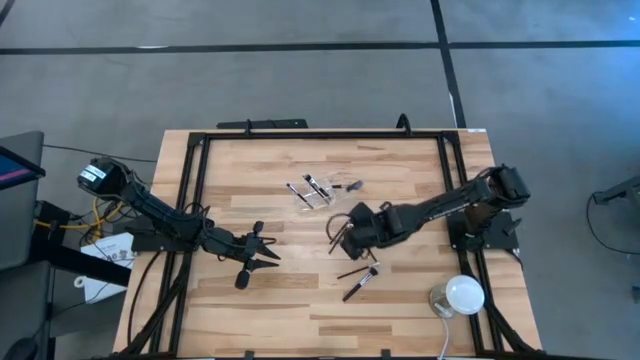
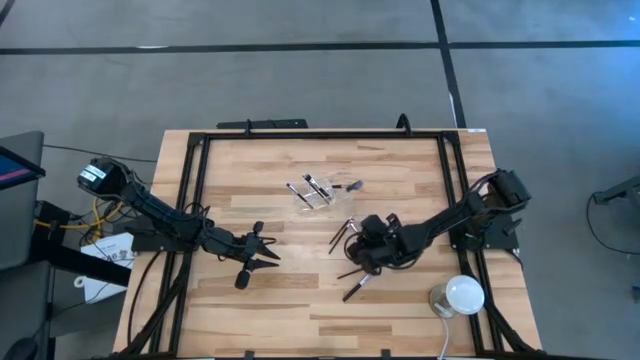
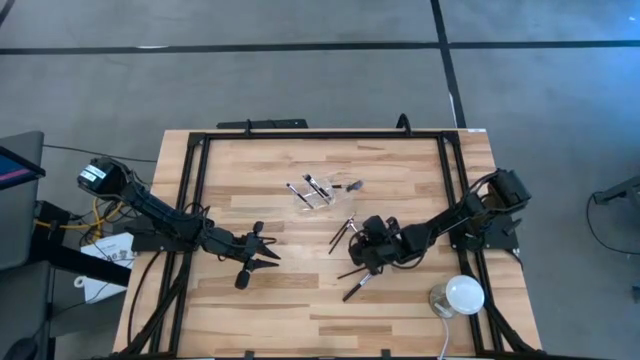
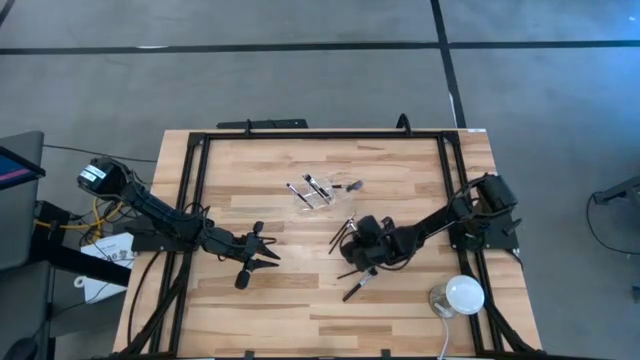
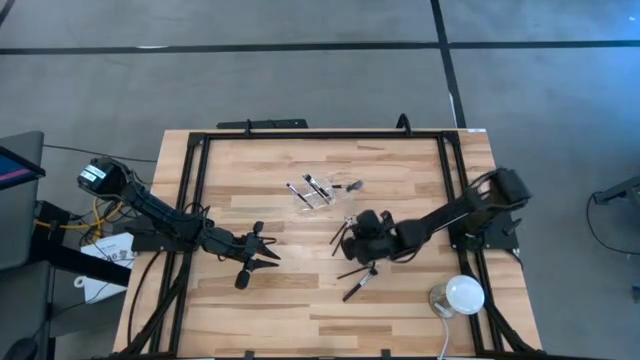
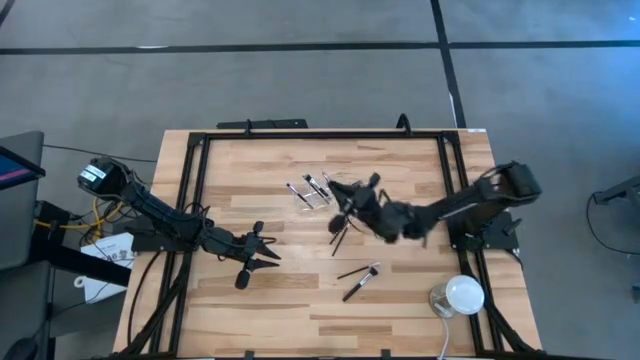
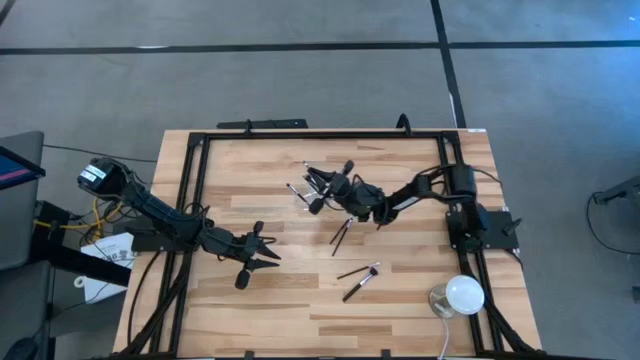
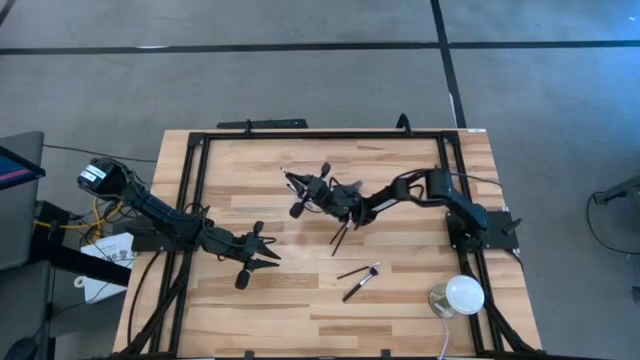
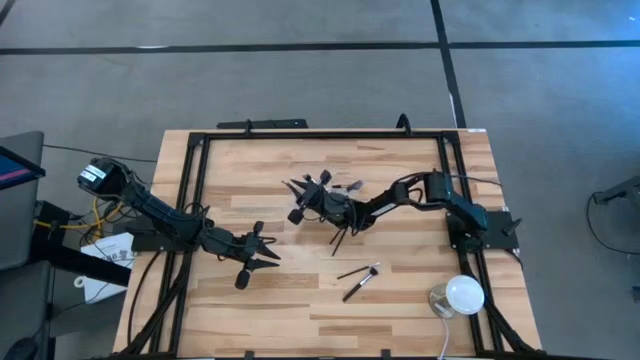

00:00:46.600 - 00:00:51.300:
Task: Put items in baskets/containers
Put the eyeshadow brush into the transparent organizer

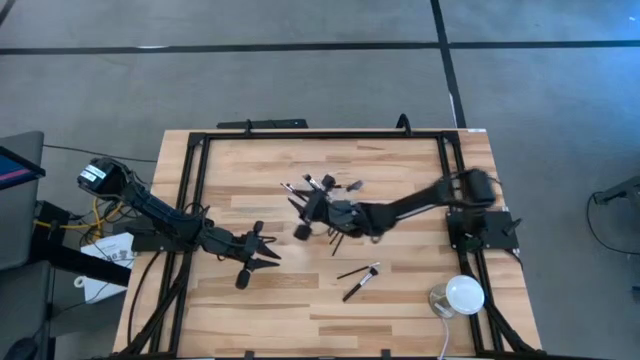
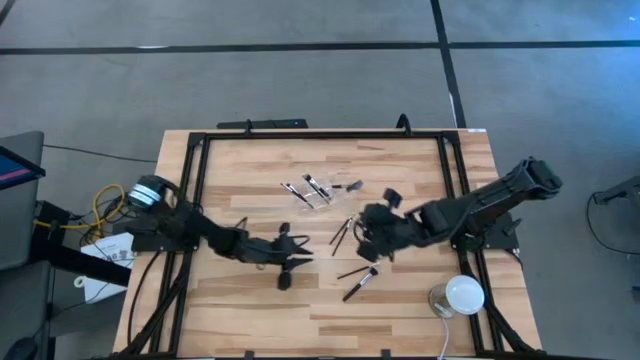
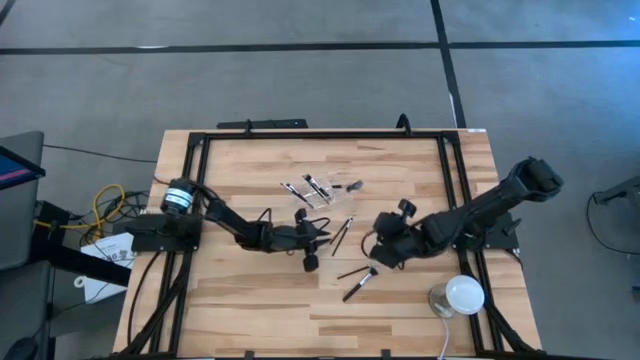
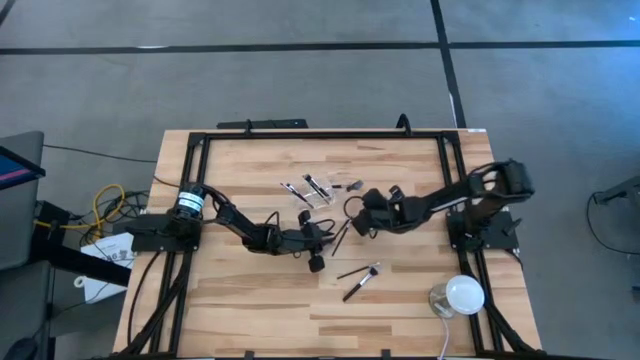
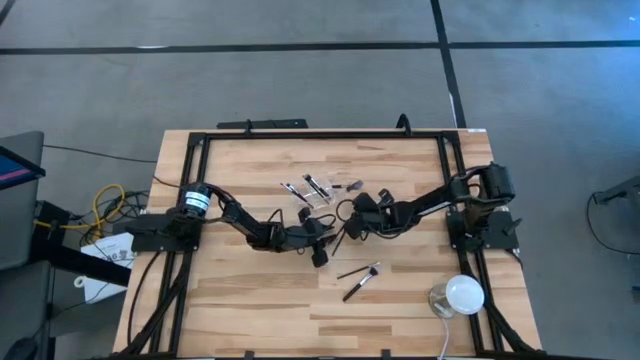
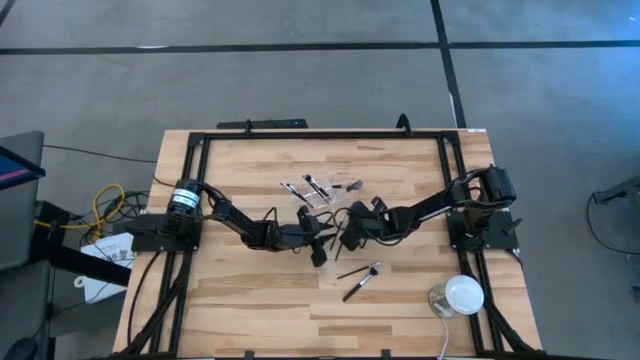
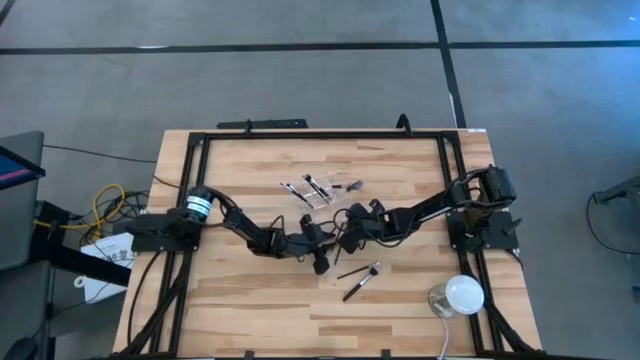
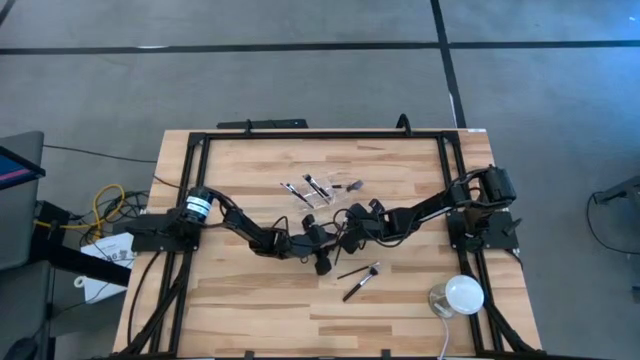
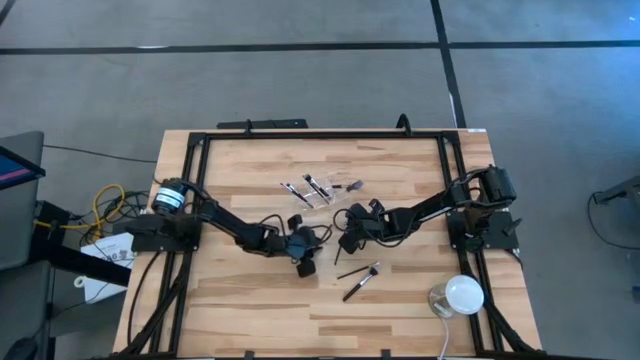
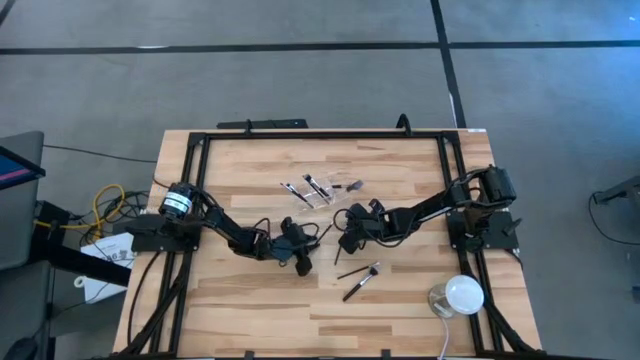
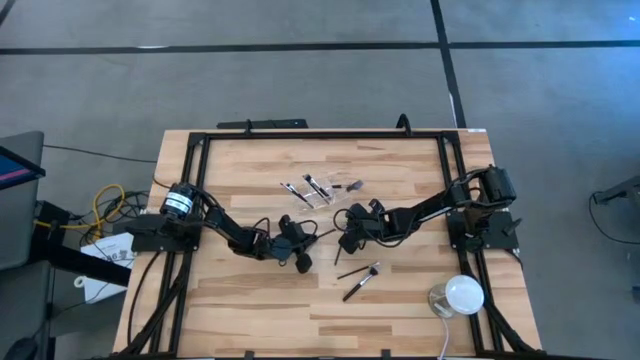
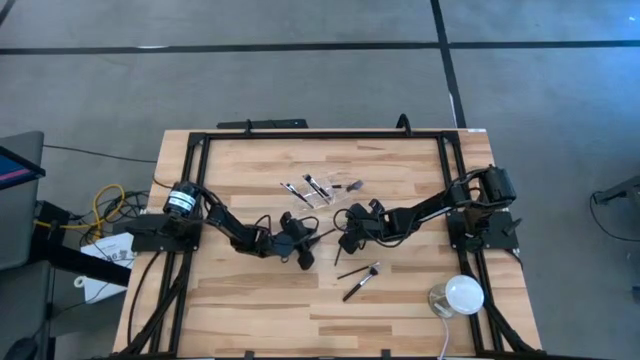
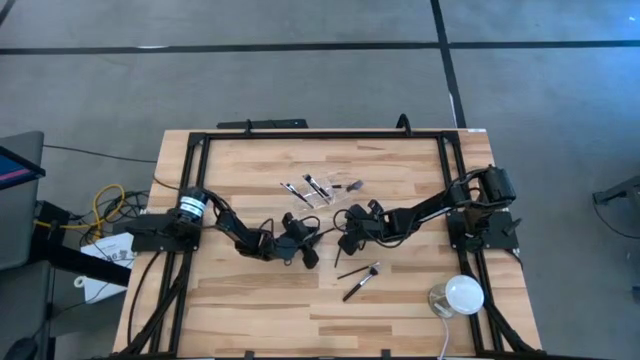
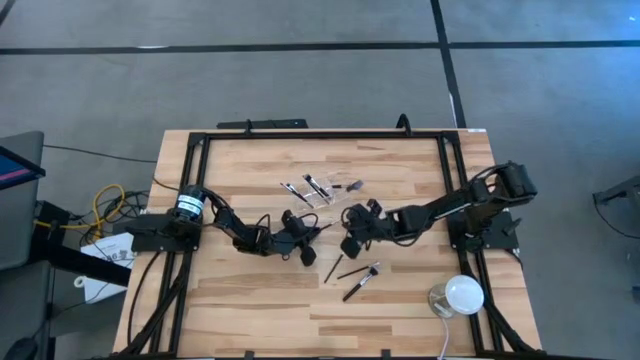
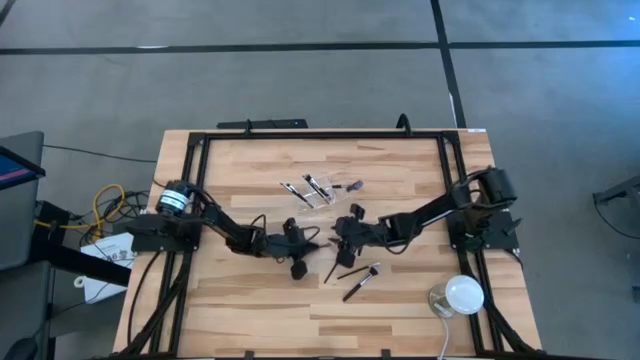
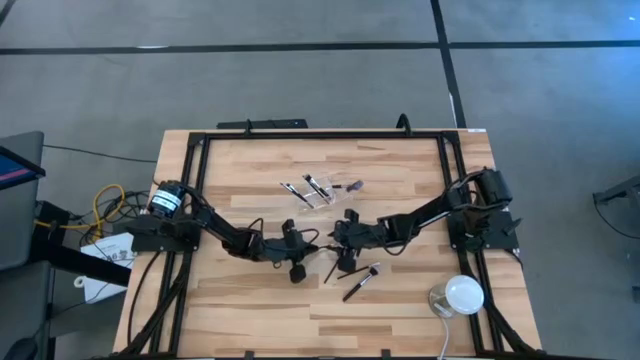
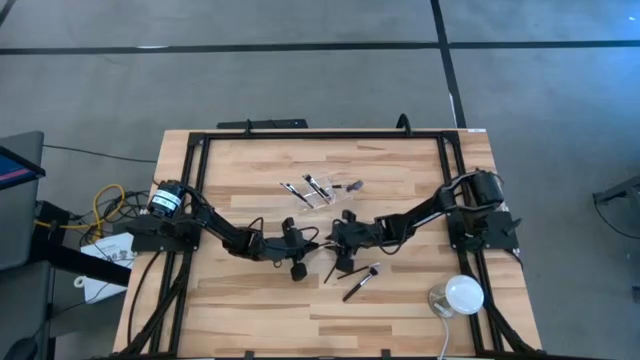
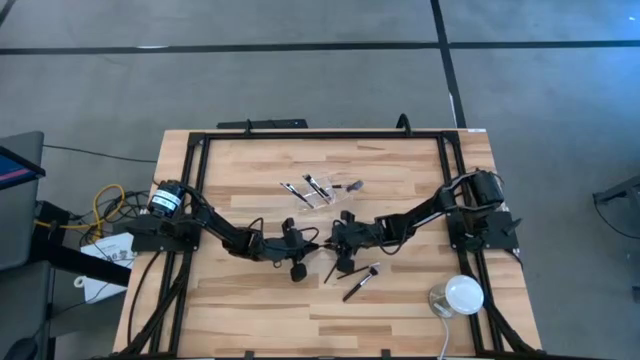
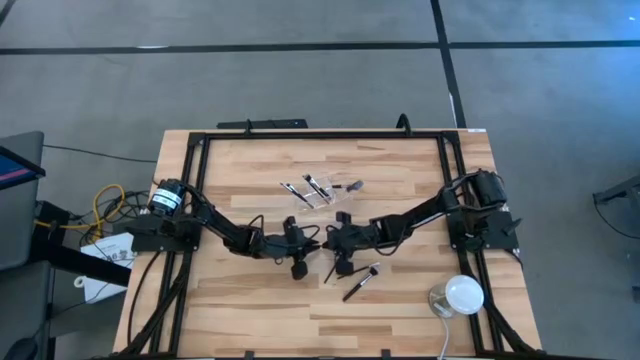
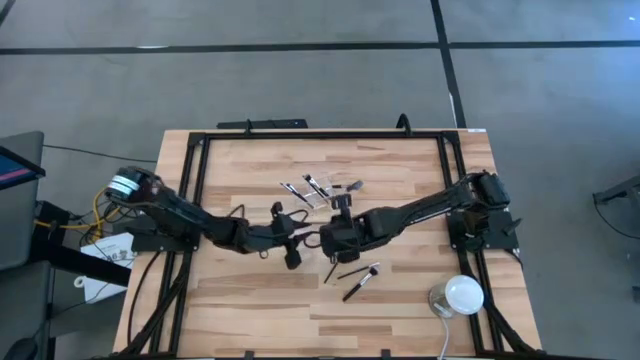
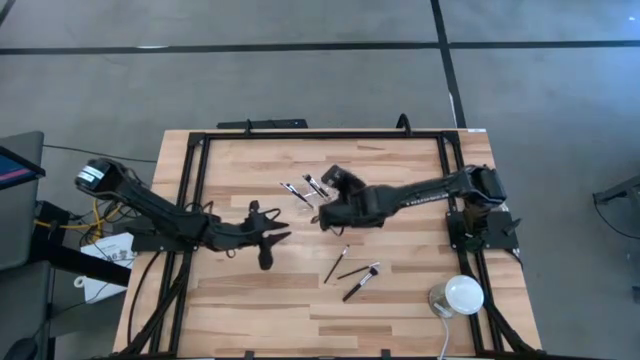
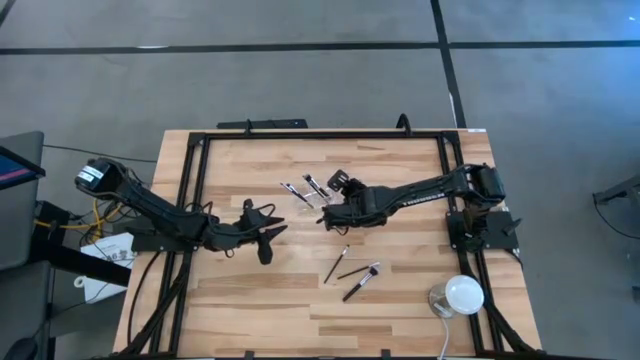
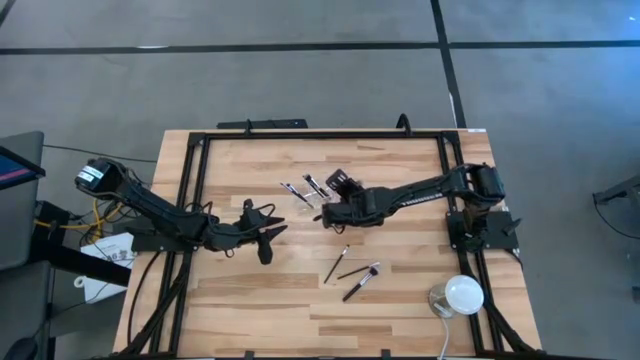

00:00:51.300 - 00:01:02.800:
Put the liner brush into the transparent organizer

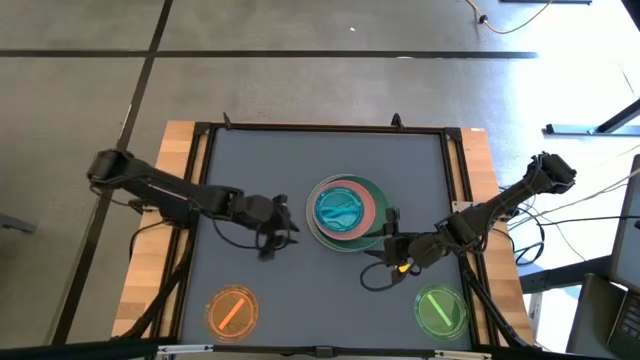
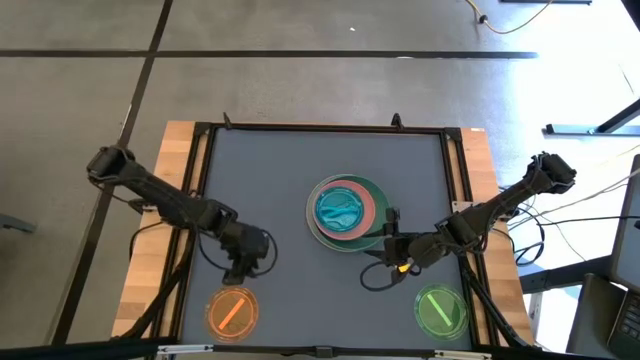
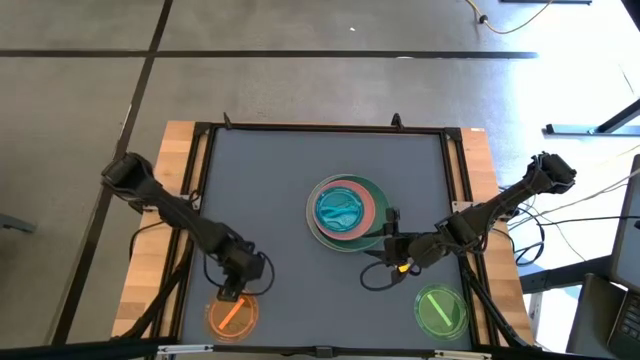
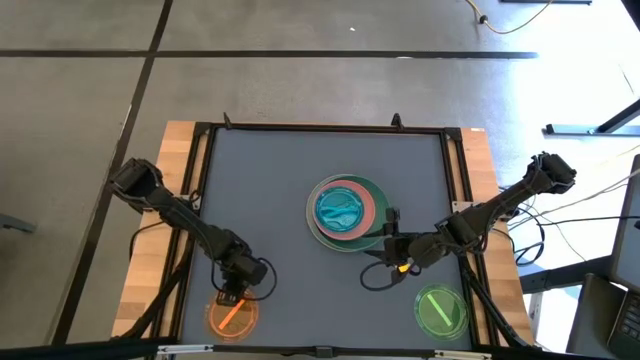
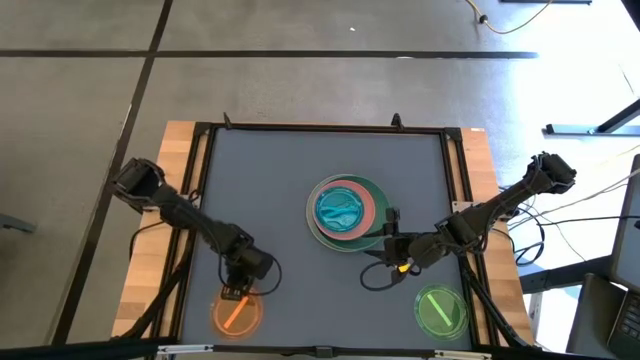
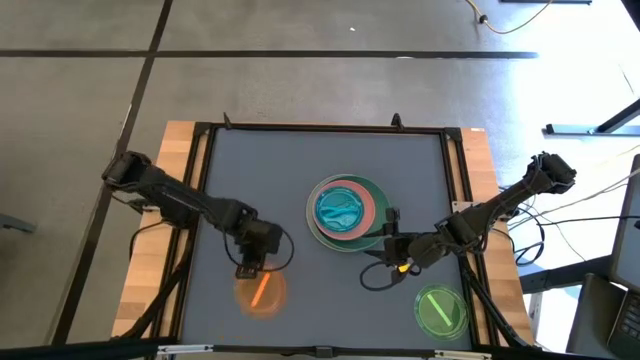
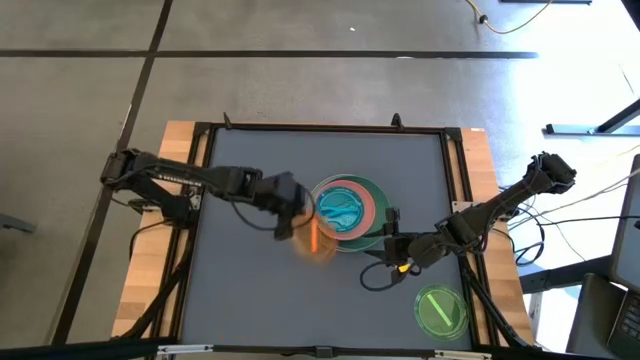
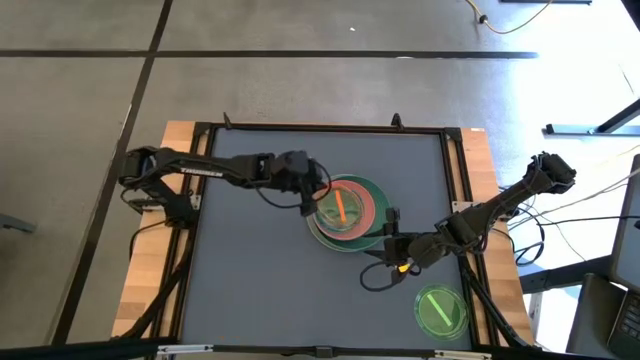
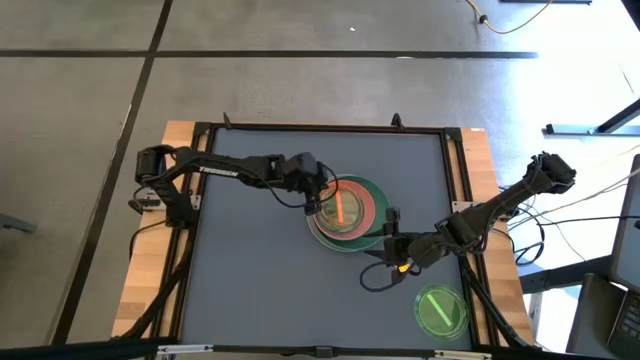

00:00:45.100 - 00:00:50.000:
Task: Stack plastic plates
Stack the transparent orange plate on top of the transparent blue plate
